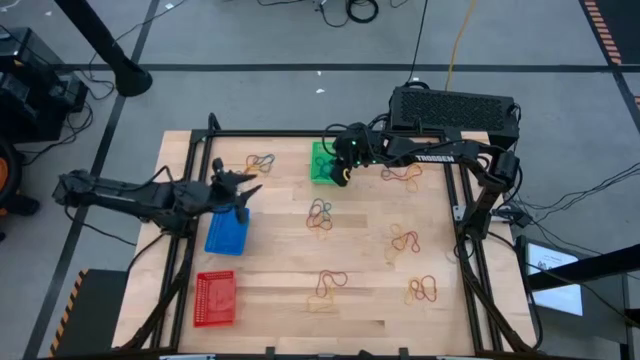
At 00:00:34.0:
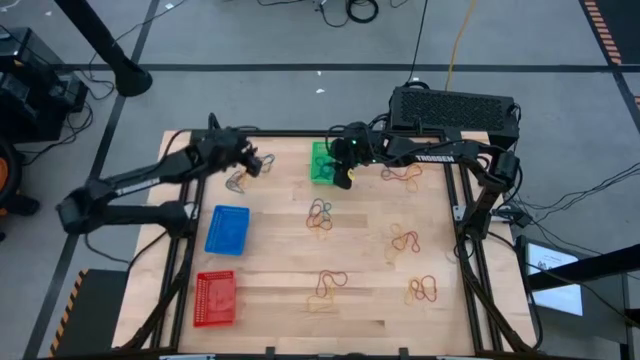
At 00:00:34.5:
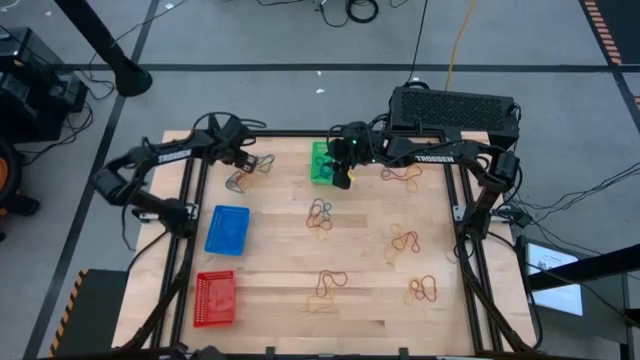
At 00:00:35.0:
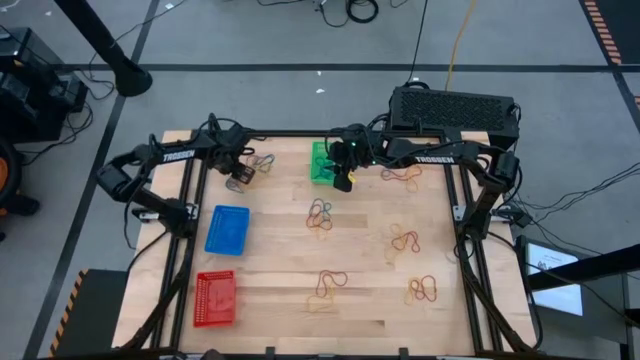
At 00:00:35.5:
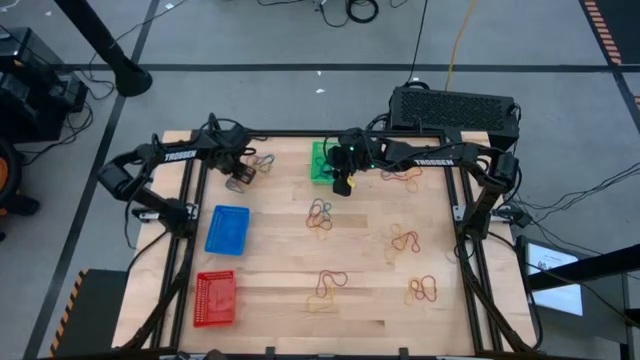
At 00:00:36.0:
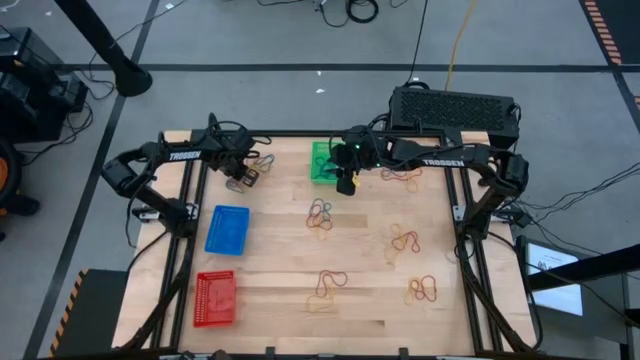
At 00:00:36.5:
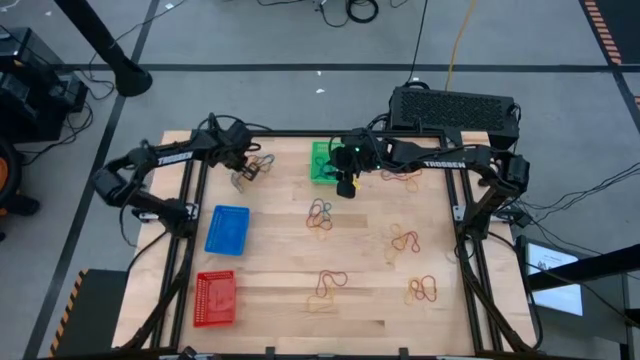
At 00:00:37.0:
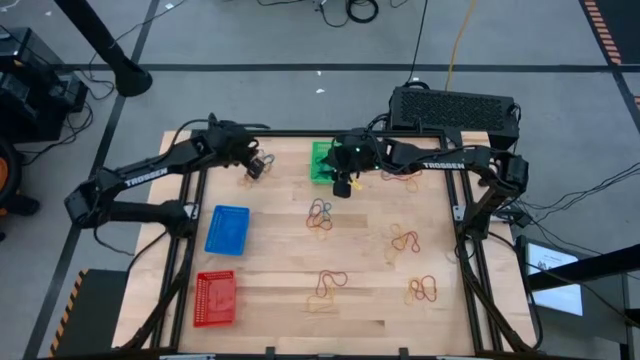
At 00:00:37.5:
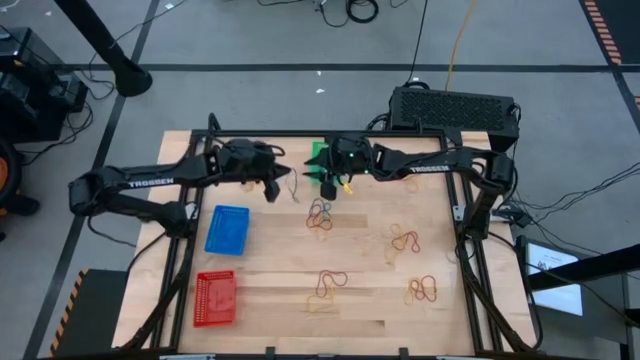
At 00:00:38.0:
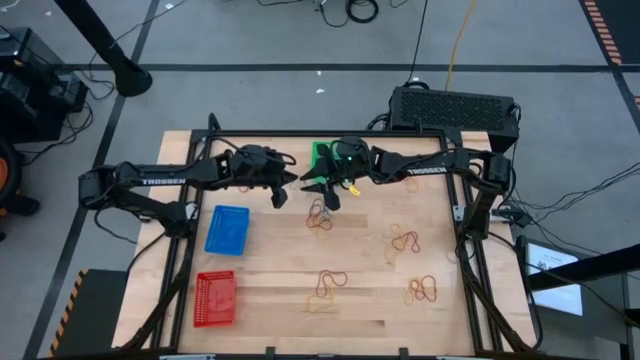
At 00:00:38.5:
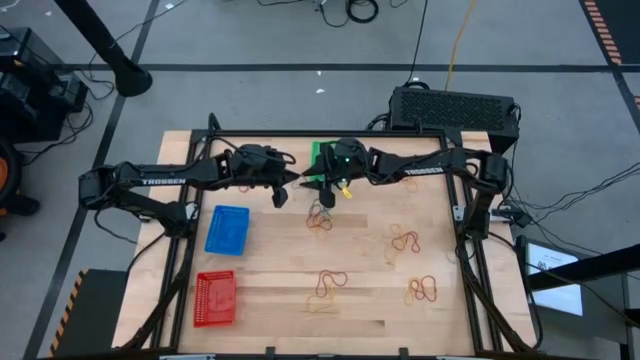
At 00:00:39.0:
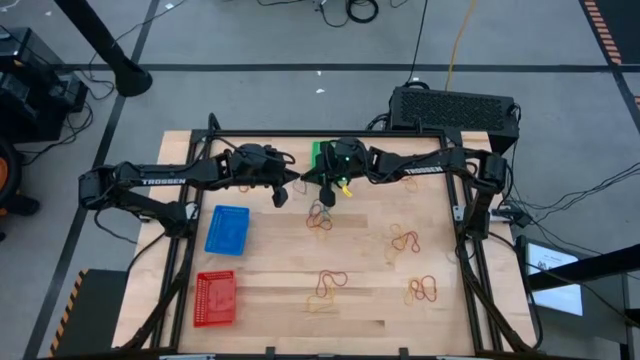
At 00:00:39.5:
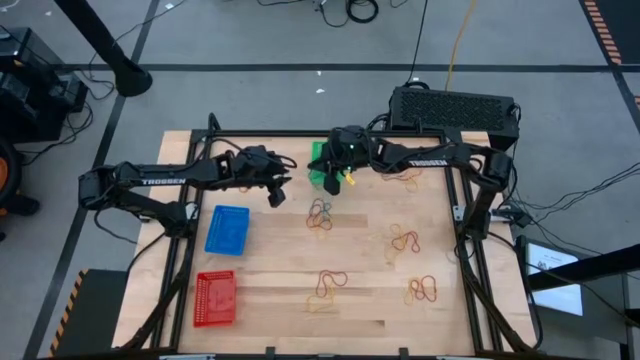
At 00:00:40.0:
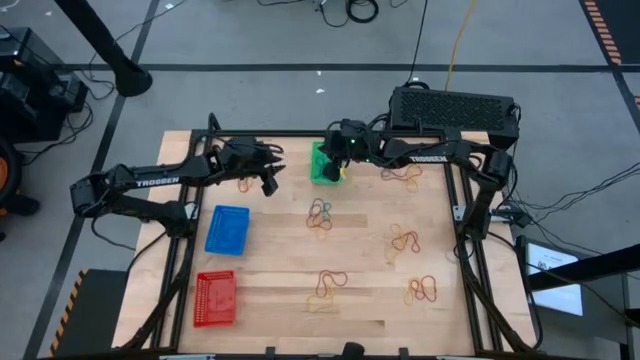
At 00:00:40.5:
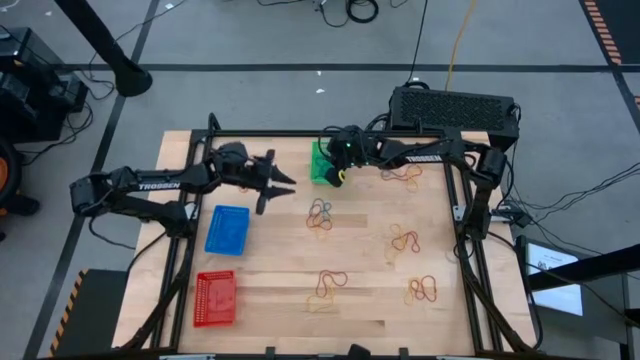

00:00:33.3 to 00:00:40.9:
Task: Sort rubber bands into baskets
Put the blue rubber band into the green bin

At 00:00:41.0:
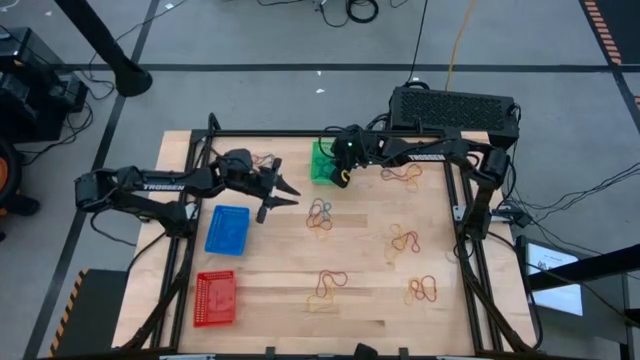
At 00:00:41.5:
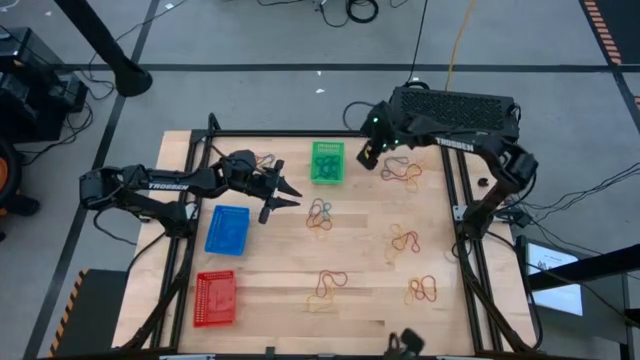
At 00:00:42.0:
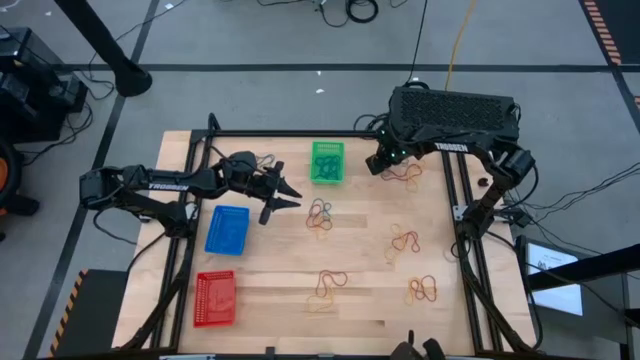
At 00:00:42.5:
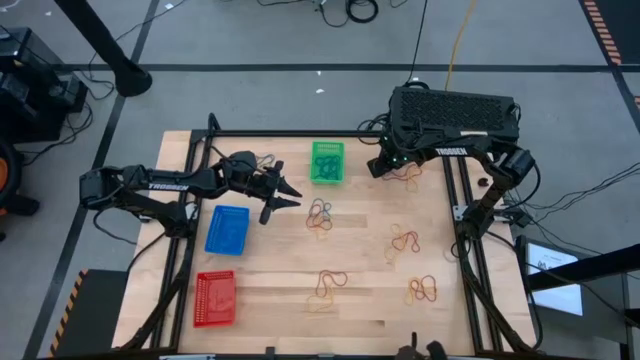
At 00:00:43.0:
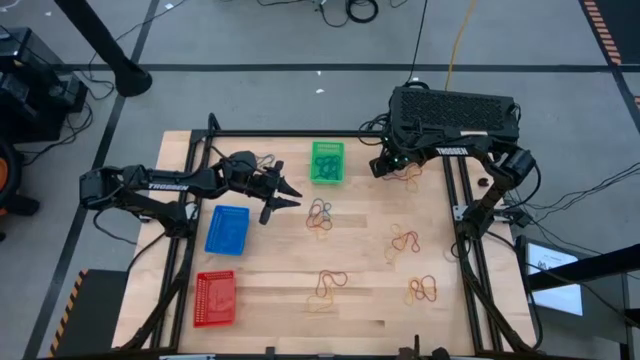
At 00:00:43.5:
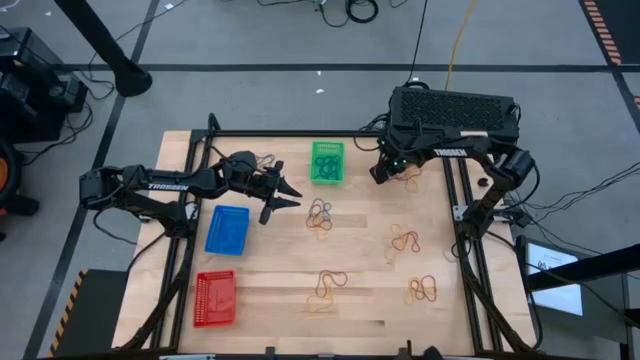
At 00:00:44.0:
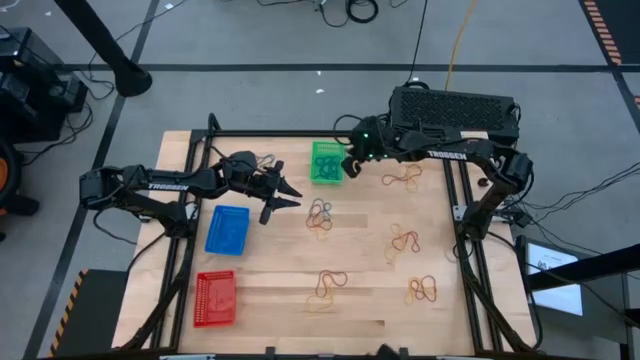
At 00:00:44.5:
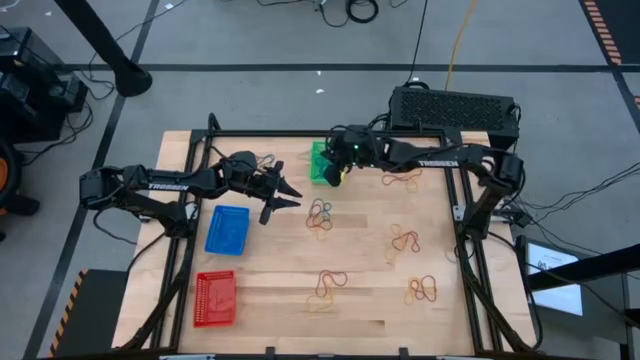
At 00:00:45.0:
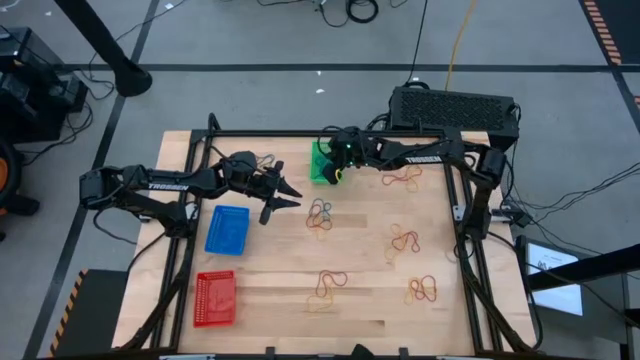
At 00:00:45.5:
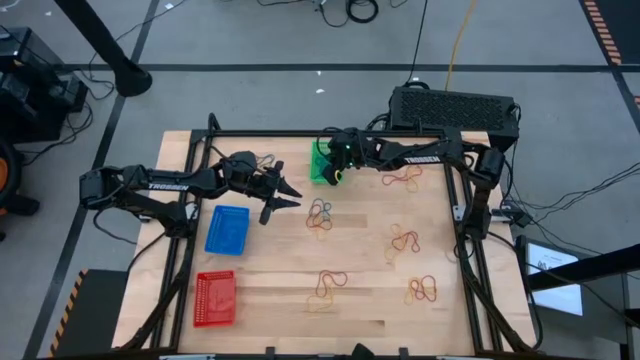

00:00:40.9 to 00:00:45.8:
Put the blue rubber band into the green bin

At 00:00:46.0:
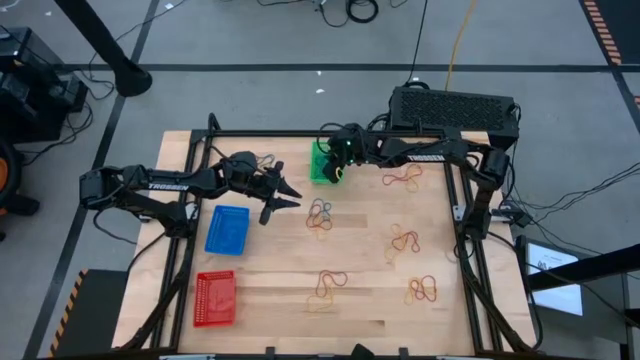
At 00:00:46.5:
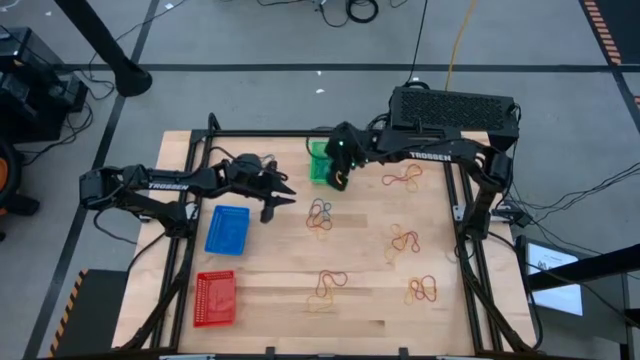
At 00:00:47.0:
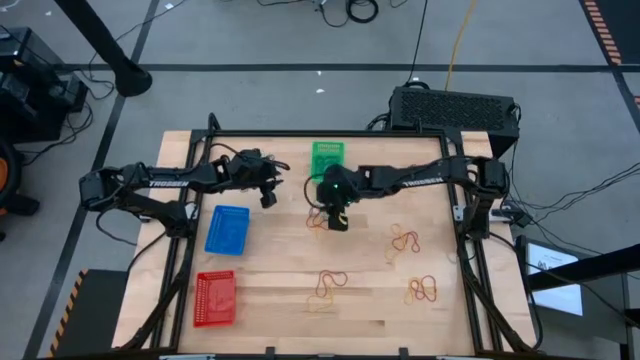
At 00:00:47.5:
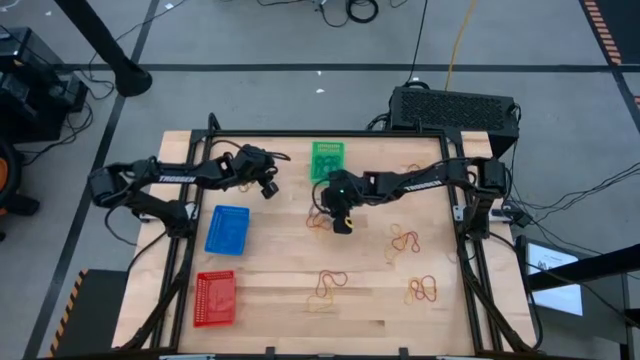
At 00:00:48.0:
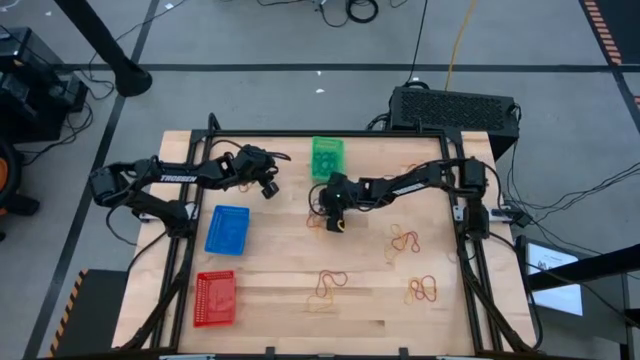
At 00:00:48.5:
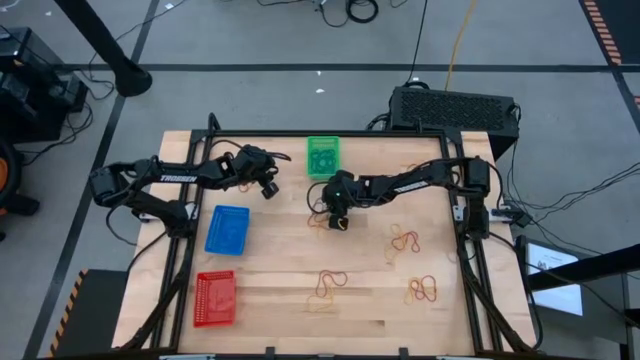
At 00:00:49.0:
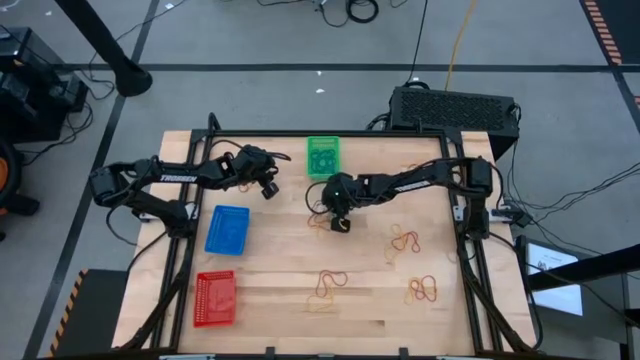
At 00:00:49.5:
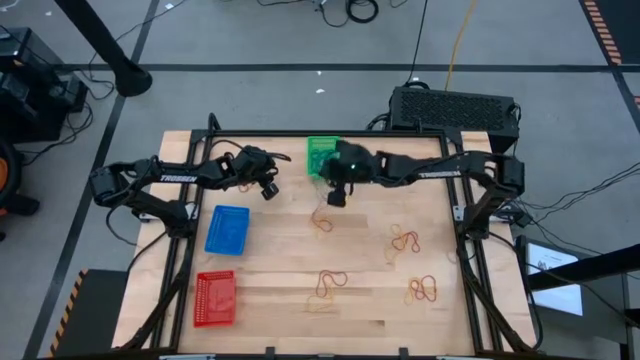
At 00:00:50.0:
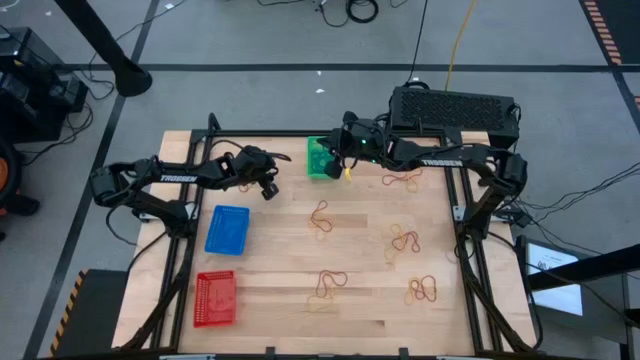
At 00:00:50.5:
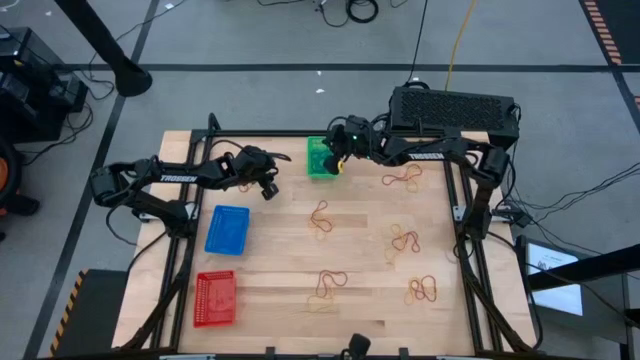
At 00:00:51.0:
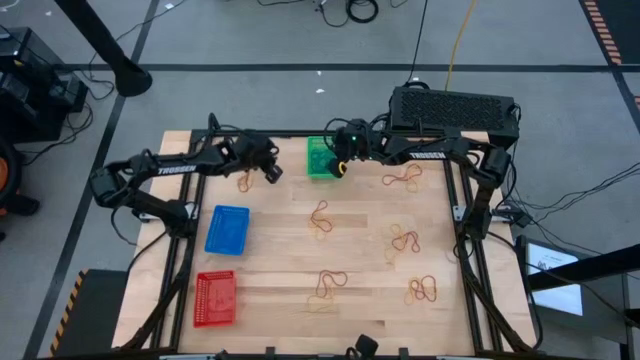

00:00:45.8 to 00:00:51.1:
Put the blue rubber band into the green bin

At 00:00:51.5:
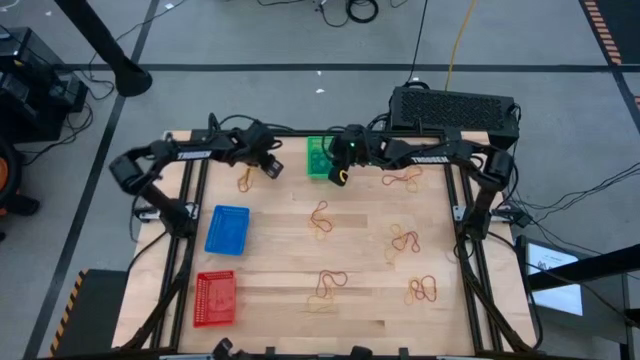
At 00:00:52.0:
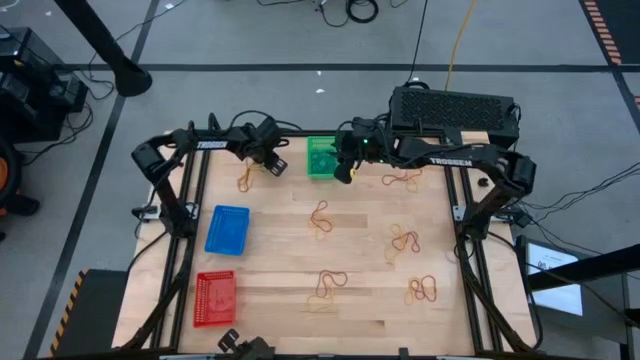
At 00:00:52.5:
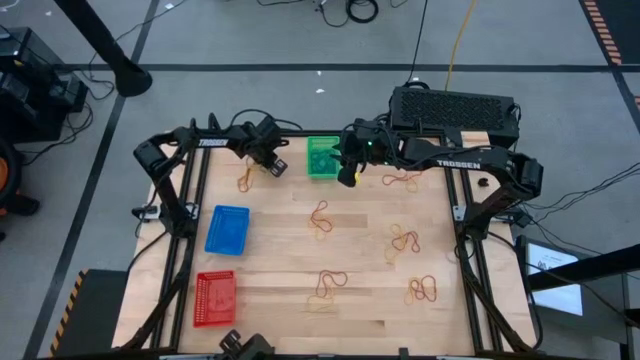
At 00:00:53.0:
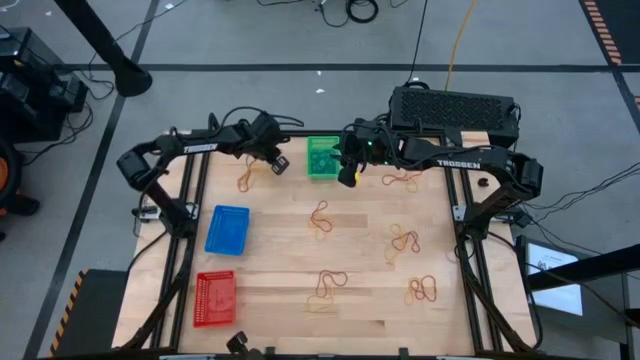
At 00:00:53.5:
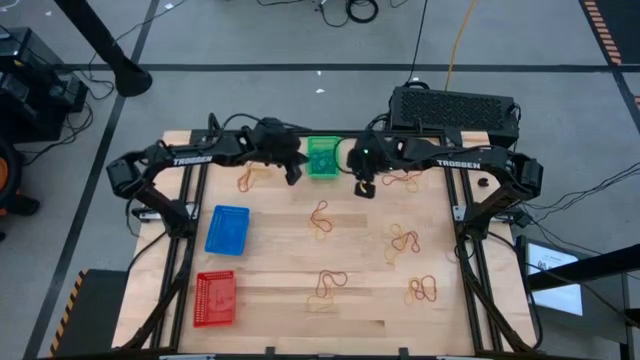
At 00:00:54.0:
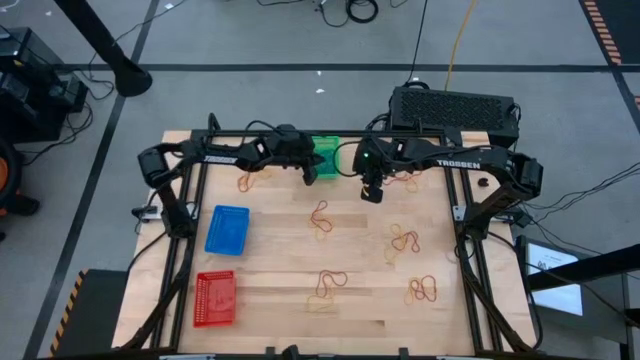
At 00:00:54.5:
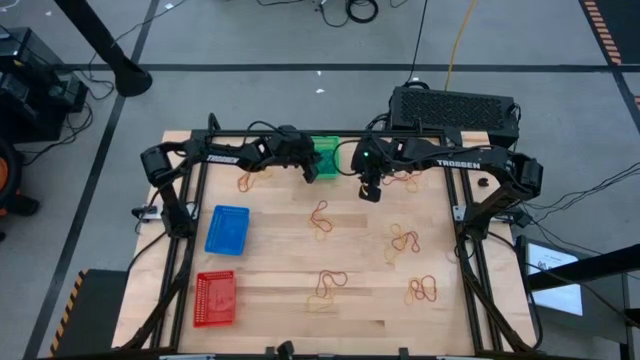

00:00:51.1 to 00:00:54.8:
Put the blue rubber band into the green bin
